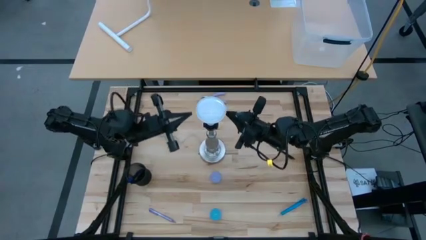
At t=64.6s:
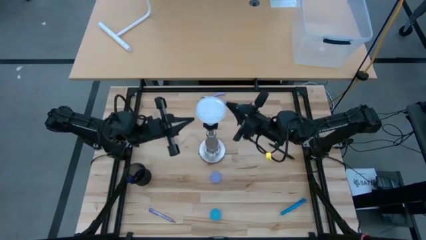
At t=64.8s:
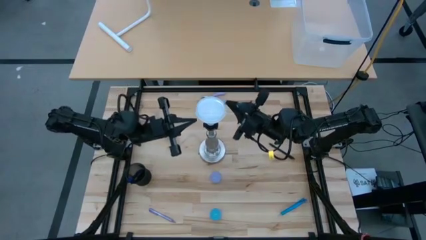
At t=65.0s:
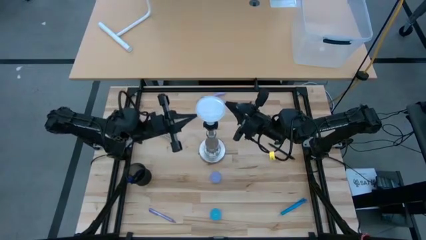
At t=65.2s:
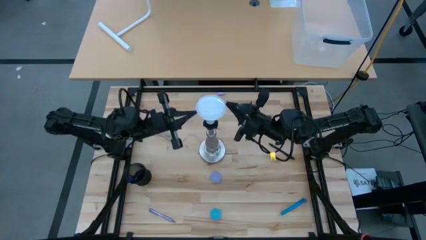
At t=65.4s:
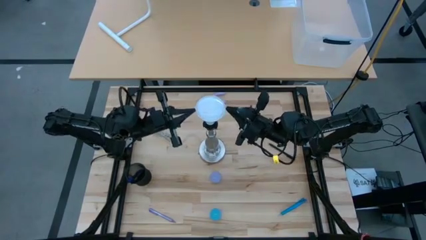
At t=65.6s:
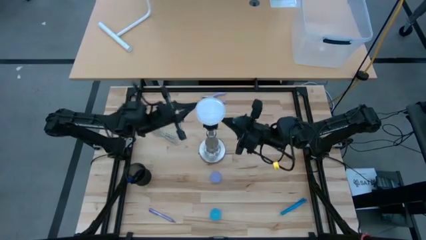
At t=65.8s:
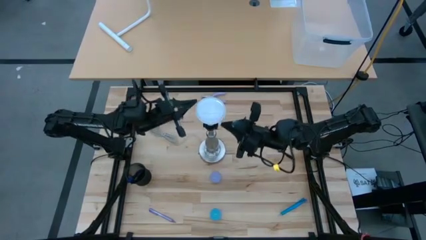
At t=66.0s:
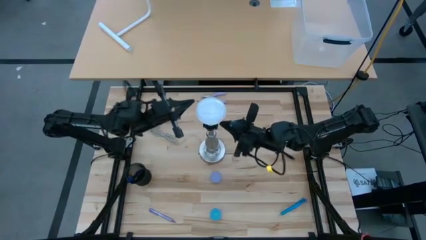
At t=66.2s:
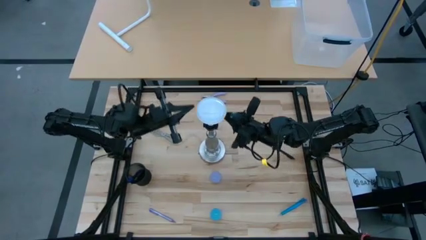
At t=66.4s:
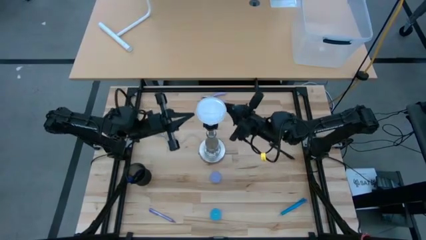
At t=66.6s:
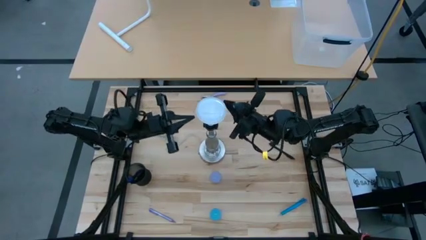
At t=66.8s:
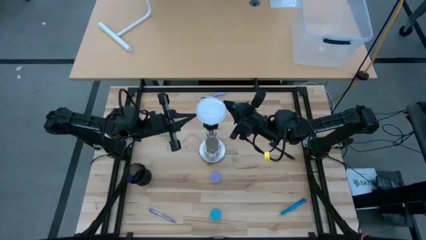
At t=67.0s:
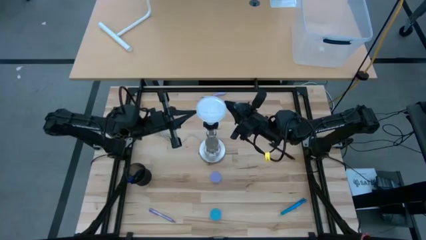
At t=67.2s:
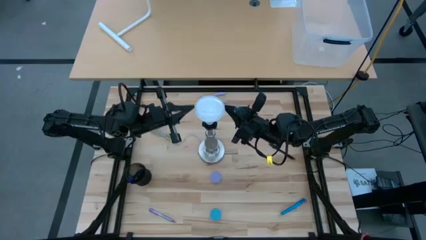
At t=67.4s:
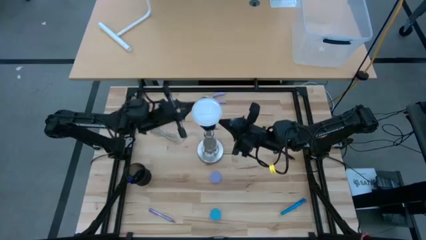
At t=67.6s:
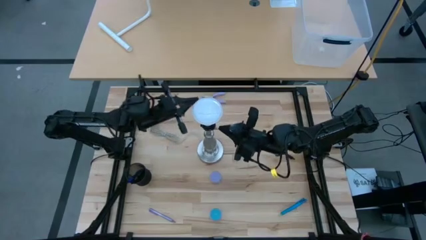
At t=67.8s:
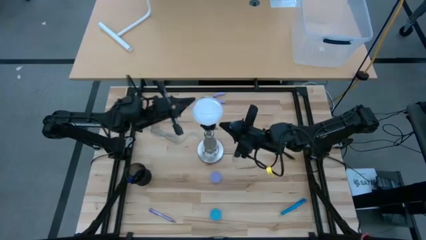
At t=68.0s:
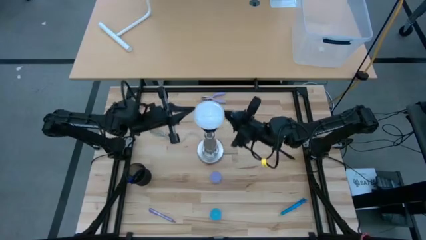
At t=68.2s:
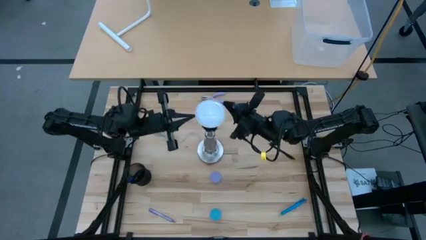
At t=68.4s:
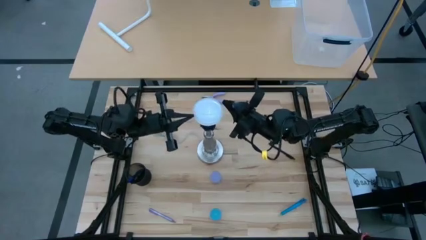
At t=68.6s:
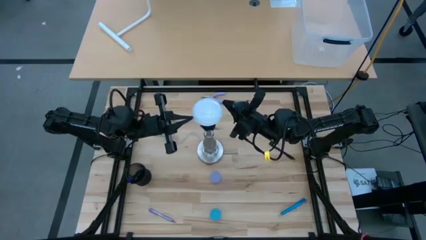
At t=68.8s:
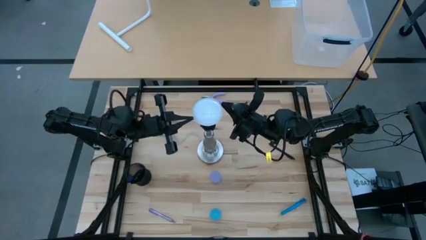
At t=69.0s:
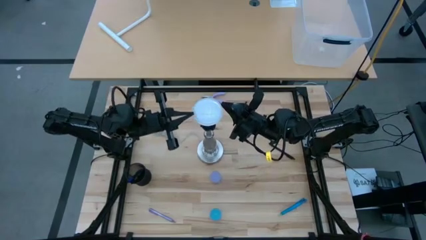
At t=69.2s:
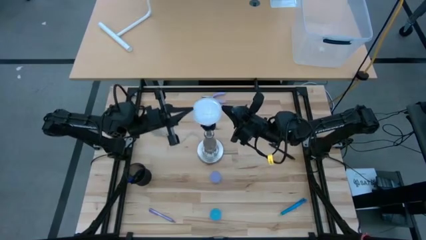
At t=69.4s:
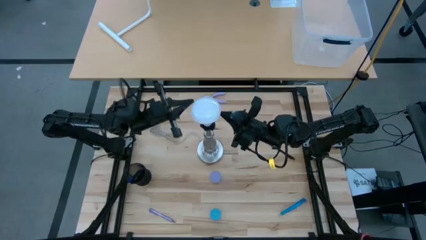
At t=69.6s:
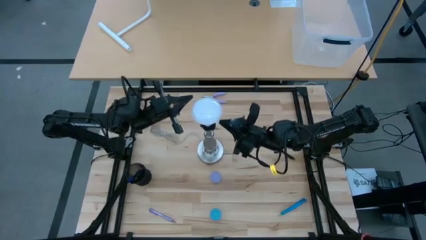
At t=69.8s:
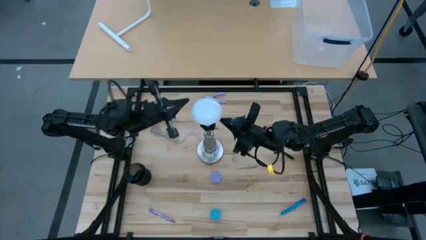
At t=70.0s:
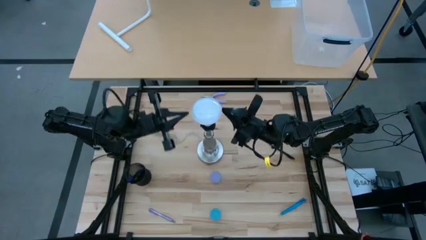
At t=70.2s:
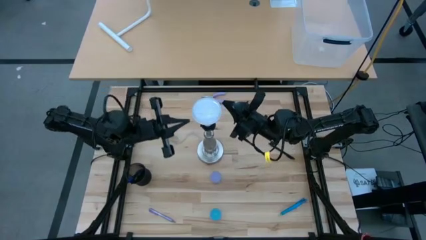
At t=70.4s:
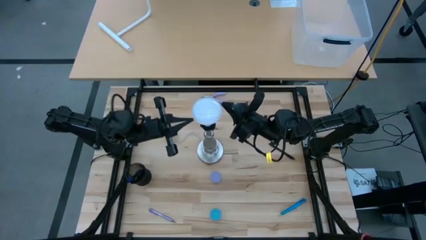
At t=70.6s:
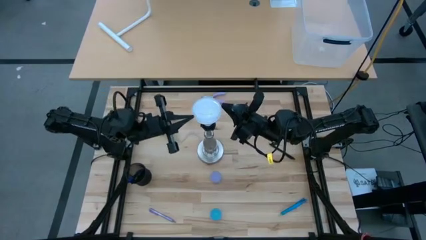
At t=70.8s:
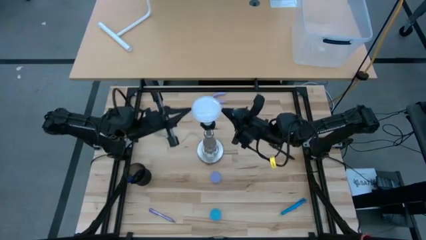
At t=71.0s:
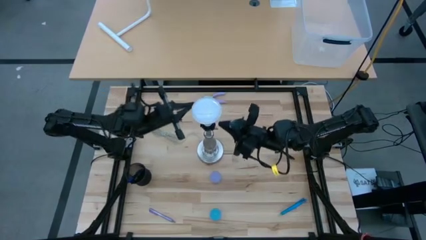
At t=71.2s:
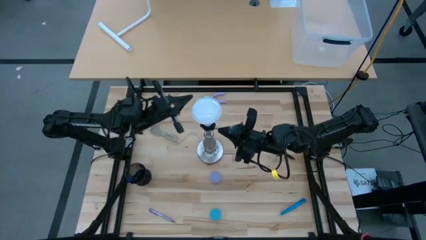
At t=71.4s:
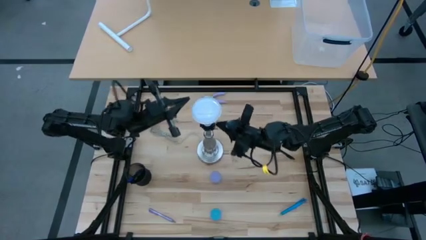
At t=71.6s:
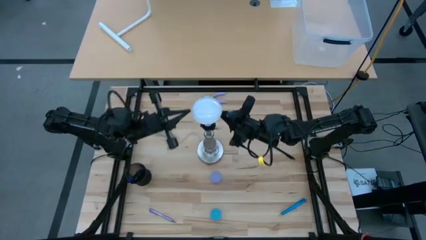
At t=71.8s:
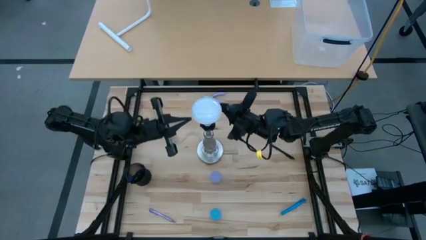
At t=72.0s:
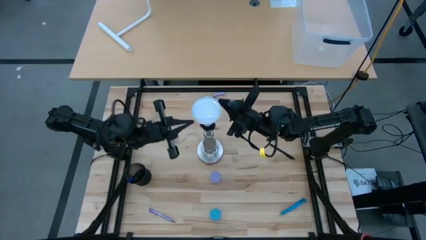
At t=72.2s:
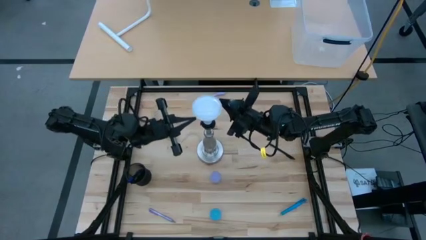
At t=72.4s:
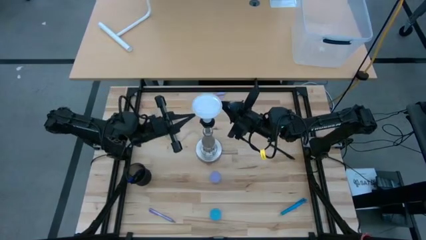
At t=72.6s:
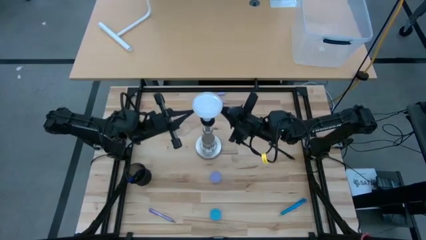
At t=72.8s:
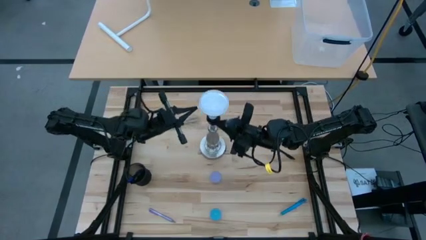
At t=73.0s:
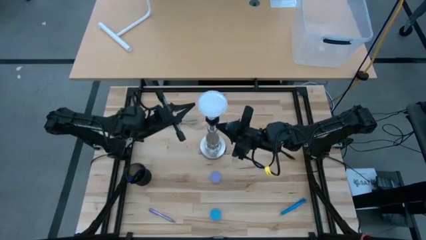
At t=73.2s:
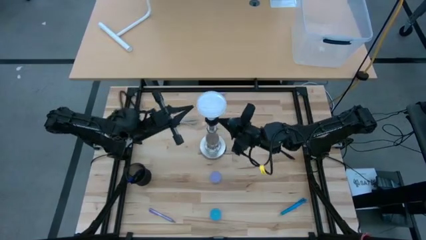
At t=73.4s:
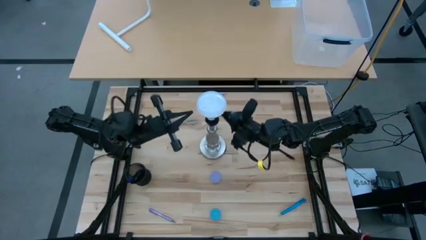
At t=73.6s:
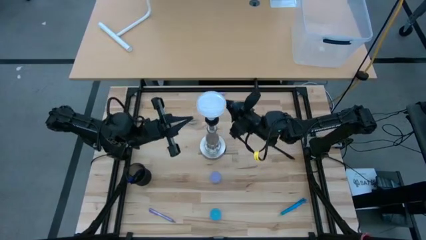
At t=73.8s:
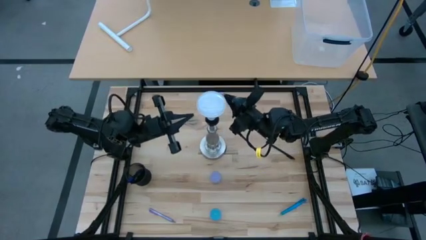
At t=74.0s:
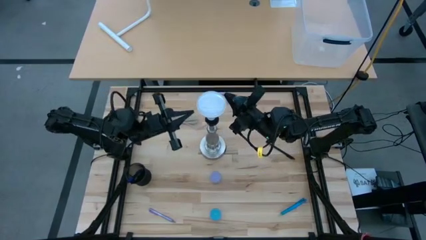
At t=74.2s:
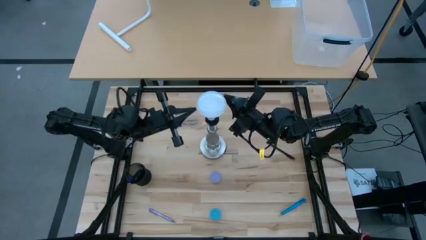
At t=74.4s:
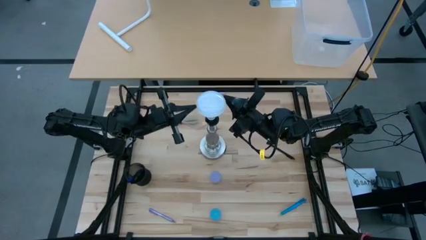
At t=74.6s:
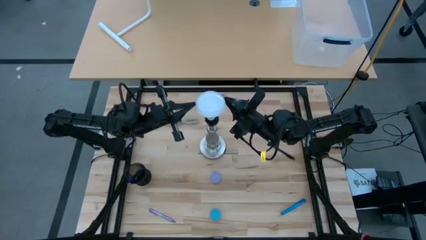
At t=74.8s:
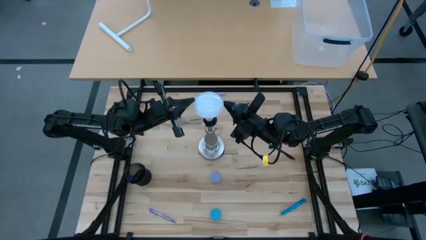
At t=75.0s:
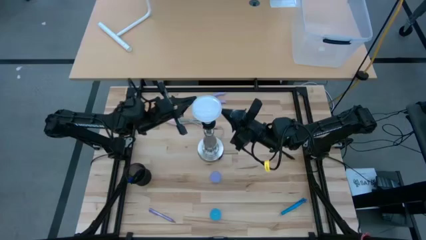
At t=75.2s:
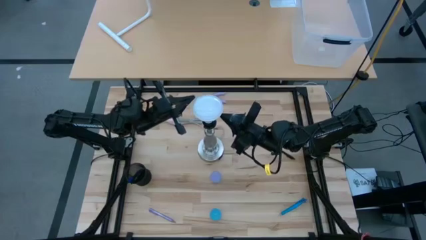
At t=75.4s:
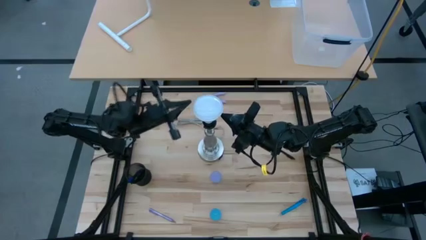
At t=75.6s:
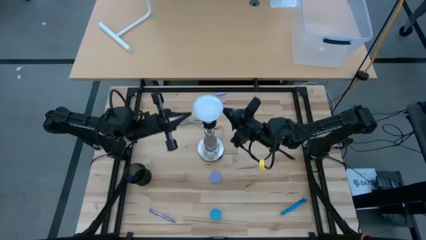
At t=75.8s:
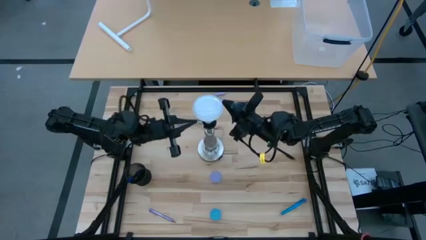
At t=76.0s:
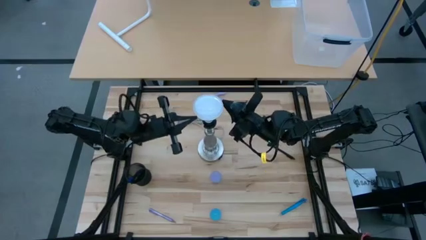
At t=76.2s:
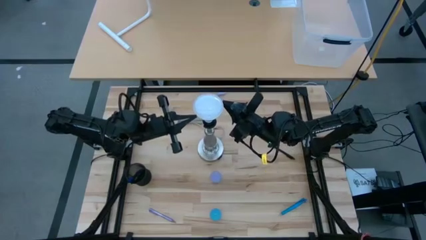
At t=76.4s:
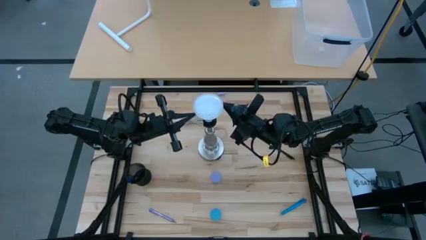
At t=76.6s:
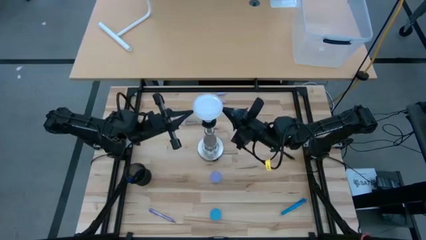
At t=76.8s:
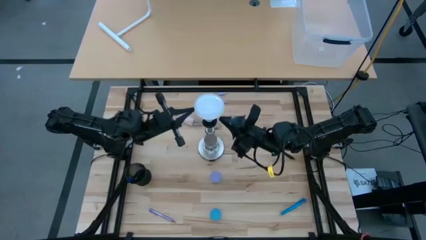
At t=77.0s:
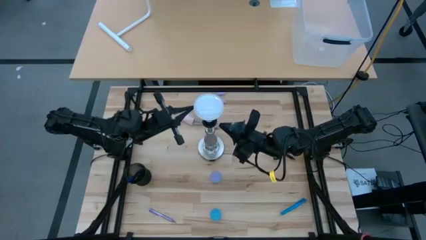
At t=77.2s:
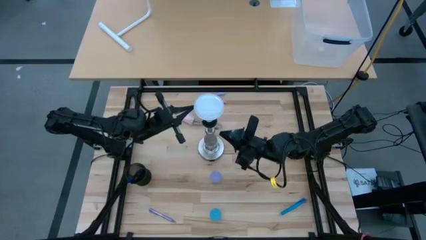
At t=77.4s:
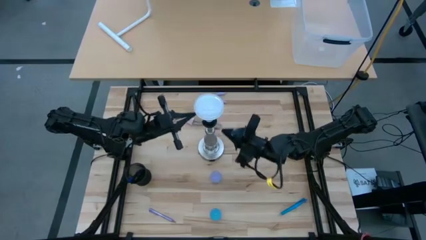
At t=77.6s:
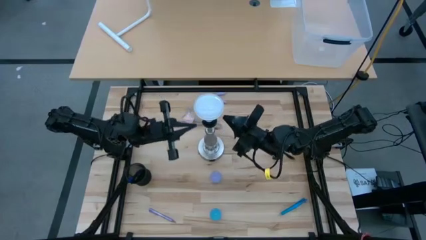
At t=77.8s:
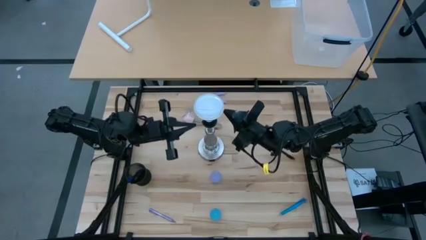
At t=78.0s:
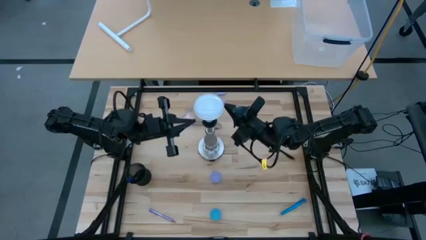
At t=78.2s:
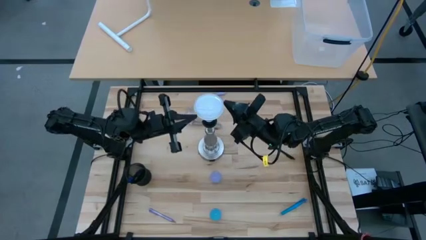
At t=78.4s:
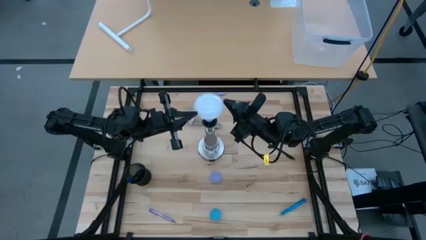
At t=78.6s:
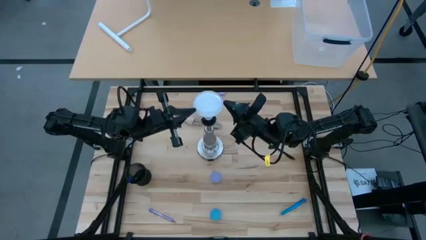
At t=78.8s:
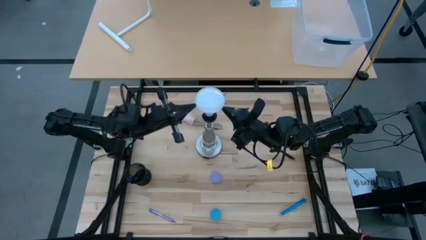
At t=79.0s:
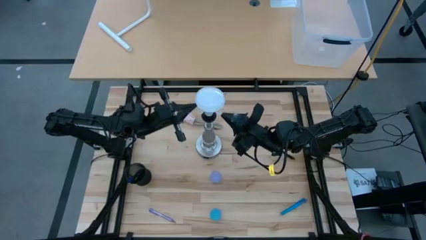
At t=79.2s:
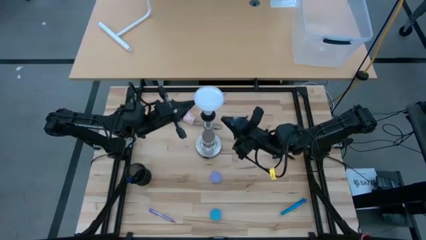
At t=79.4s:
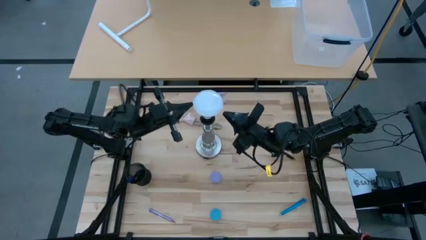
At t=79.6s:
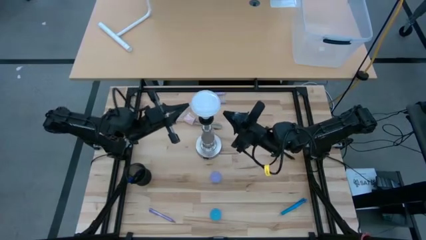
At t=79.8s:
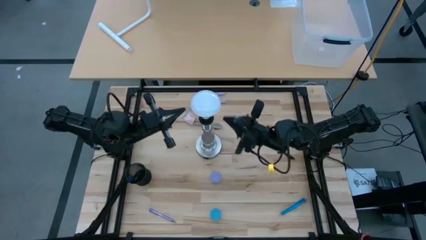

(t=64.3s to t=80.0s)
Task: Screw lightbulb
Insert the lightbulb into the silver lamp socket
